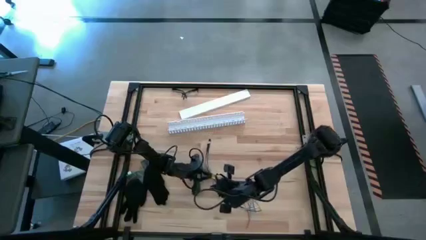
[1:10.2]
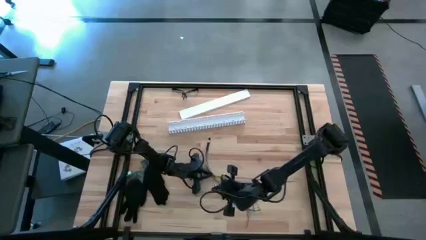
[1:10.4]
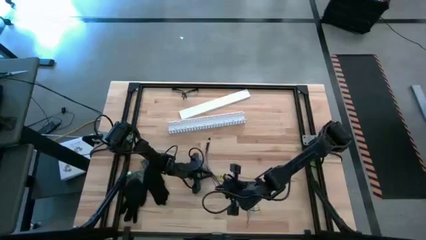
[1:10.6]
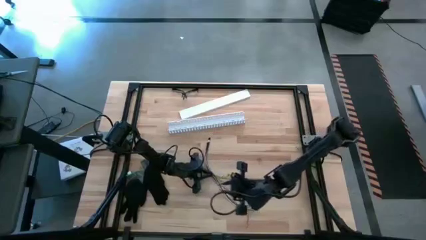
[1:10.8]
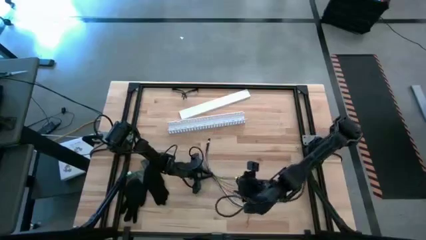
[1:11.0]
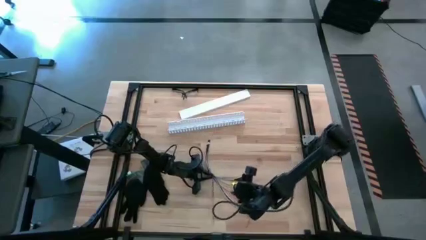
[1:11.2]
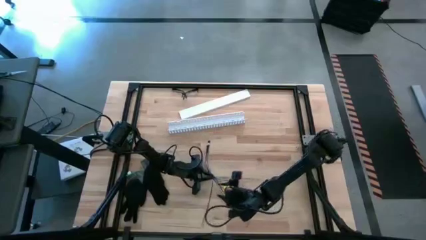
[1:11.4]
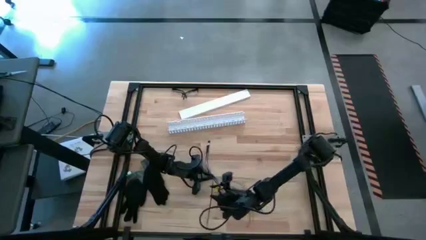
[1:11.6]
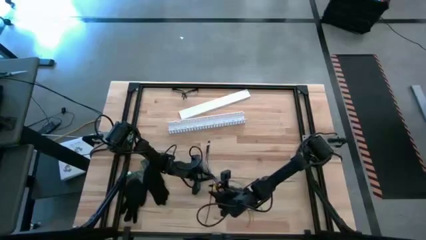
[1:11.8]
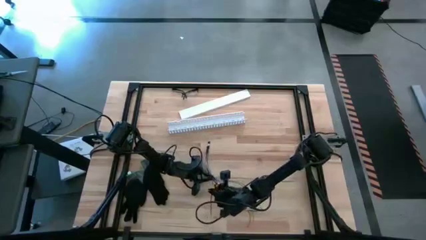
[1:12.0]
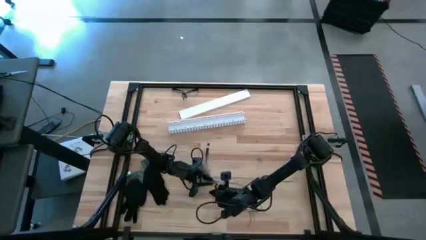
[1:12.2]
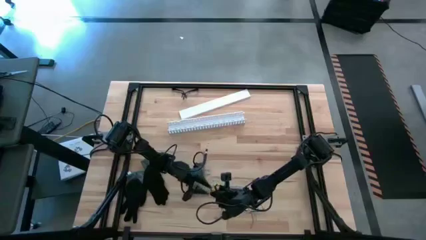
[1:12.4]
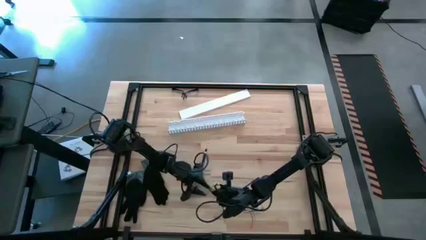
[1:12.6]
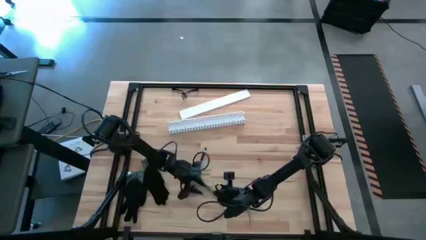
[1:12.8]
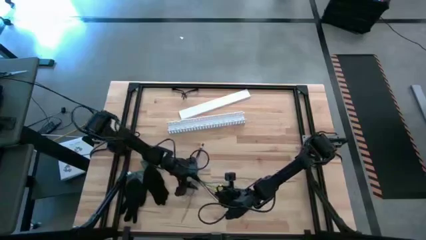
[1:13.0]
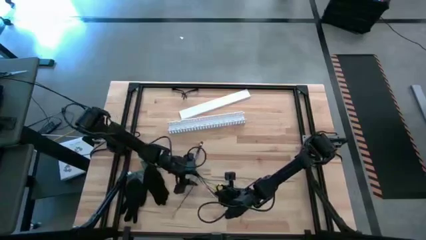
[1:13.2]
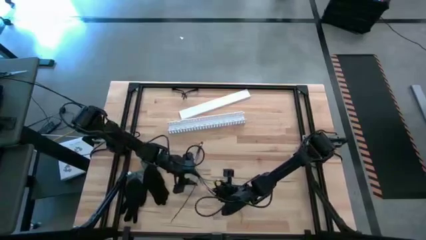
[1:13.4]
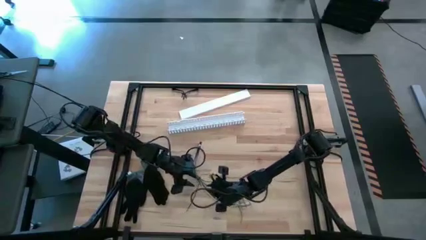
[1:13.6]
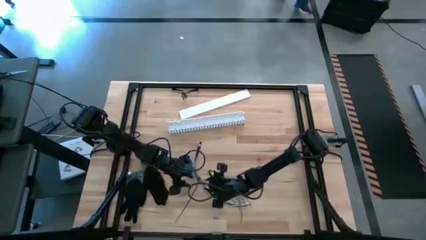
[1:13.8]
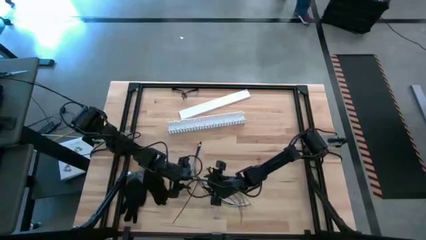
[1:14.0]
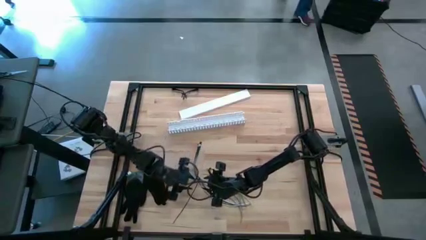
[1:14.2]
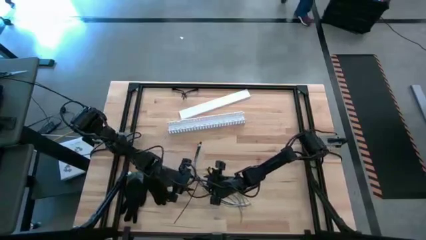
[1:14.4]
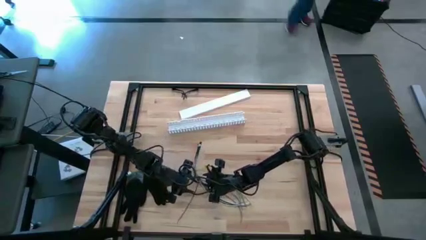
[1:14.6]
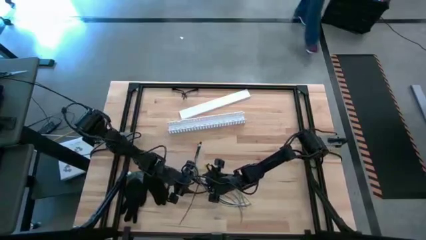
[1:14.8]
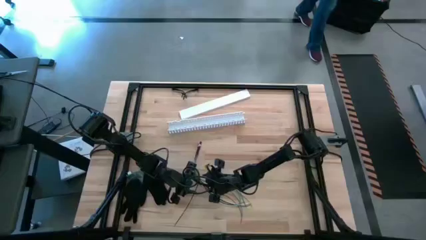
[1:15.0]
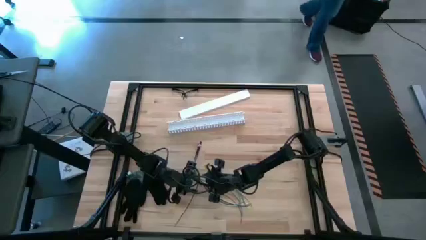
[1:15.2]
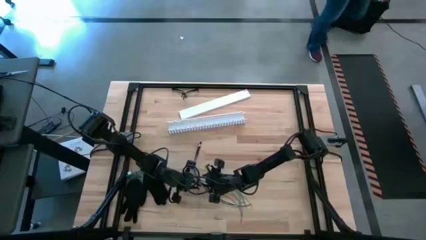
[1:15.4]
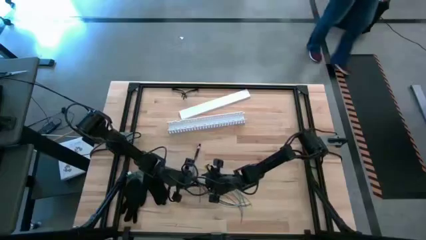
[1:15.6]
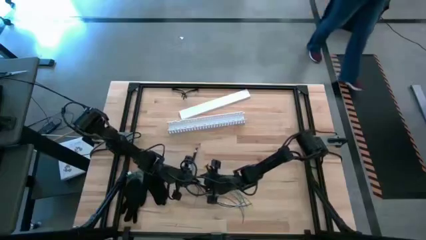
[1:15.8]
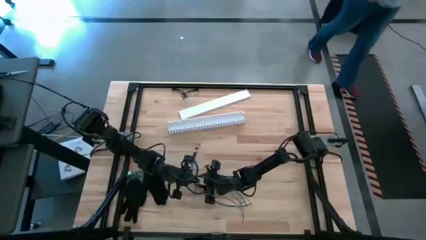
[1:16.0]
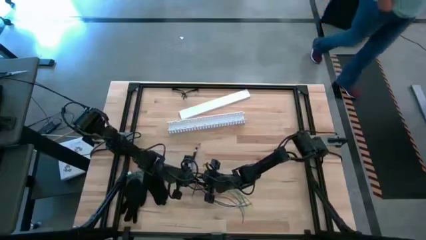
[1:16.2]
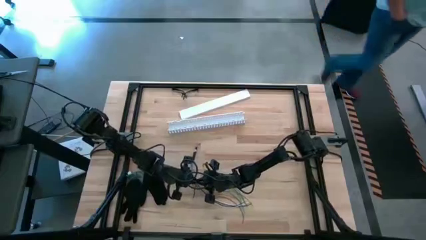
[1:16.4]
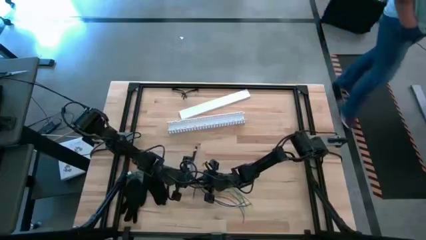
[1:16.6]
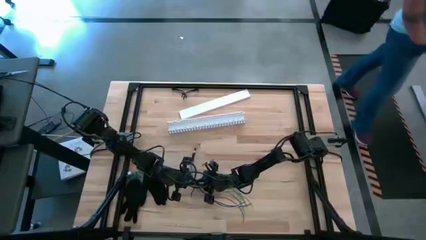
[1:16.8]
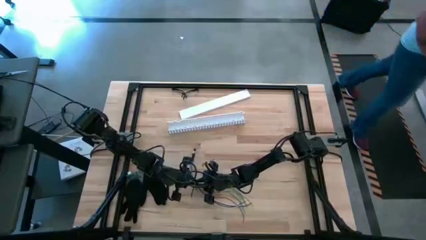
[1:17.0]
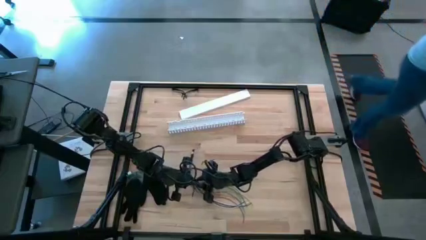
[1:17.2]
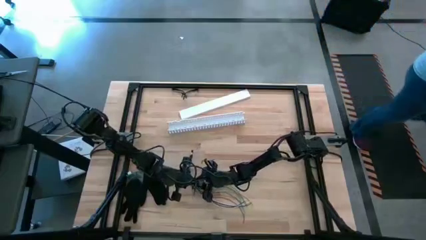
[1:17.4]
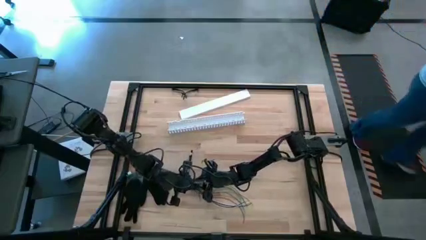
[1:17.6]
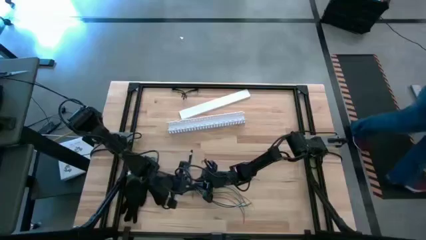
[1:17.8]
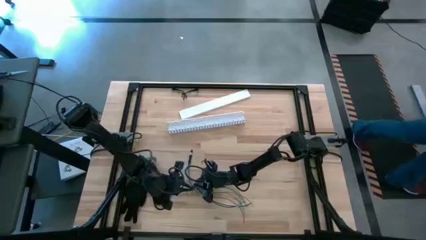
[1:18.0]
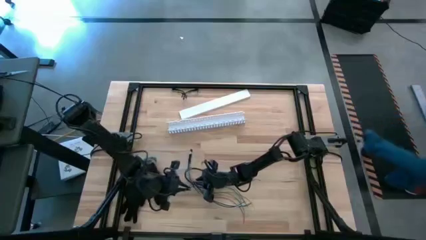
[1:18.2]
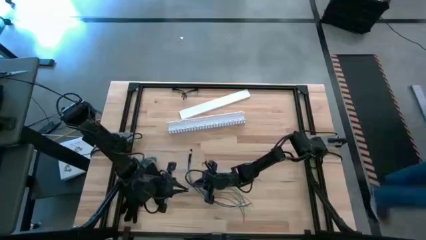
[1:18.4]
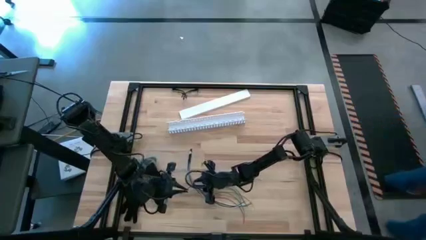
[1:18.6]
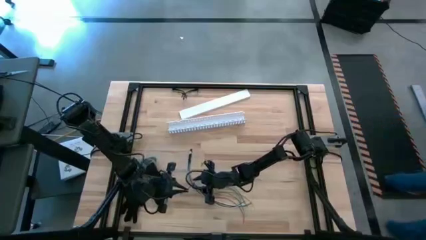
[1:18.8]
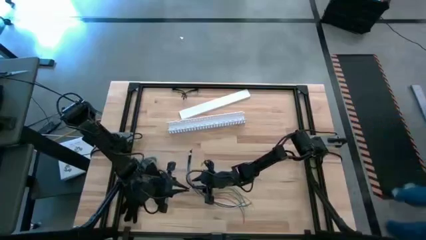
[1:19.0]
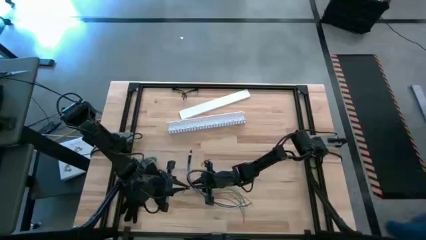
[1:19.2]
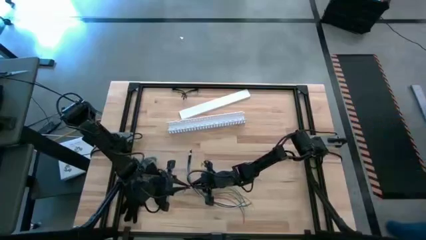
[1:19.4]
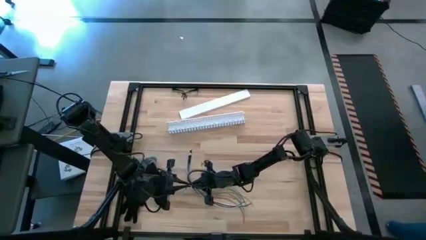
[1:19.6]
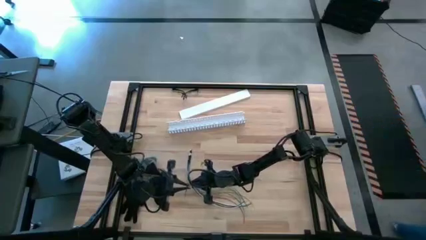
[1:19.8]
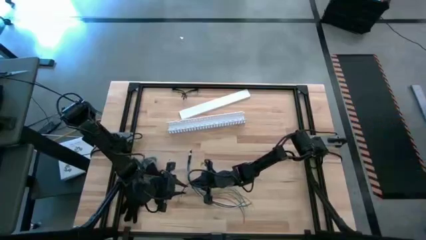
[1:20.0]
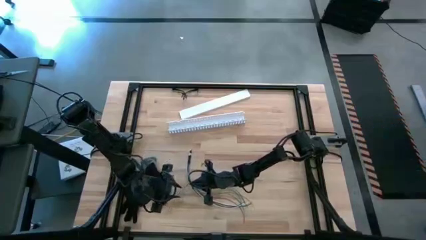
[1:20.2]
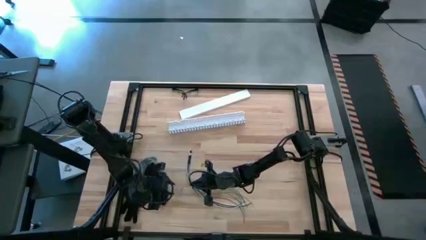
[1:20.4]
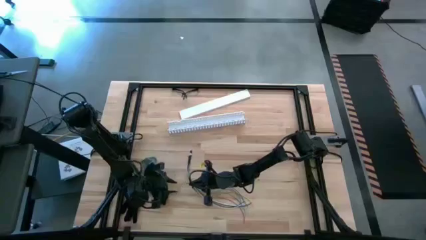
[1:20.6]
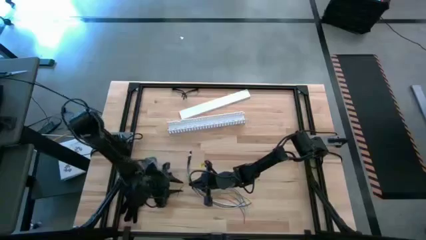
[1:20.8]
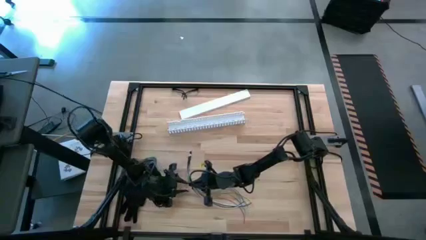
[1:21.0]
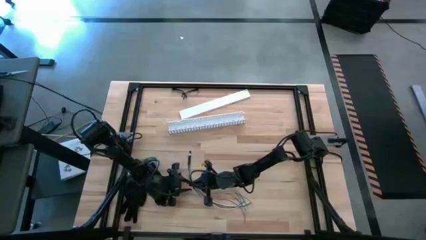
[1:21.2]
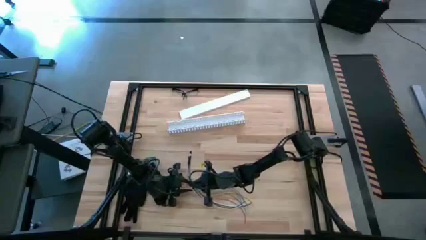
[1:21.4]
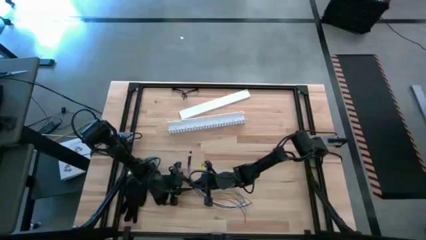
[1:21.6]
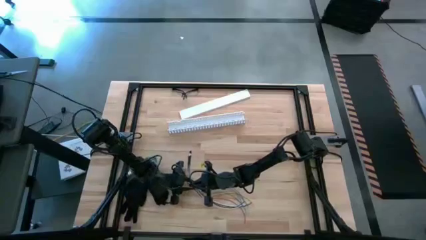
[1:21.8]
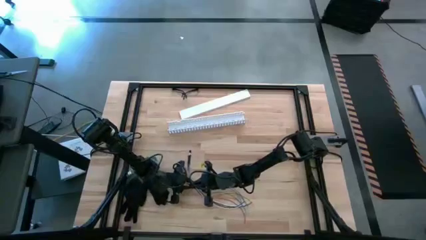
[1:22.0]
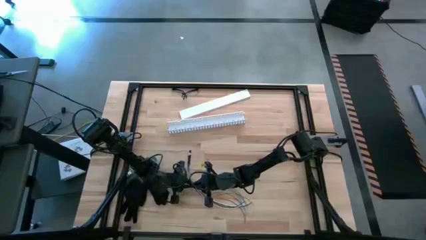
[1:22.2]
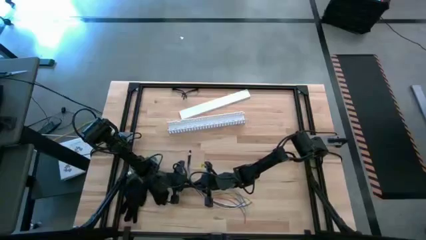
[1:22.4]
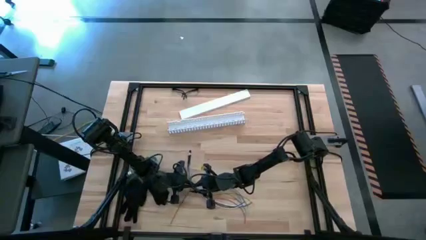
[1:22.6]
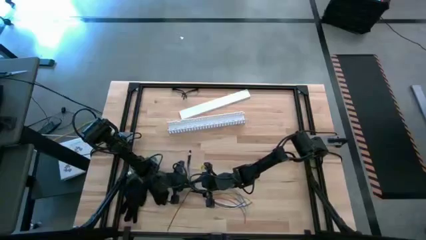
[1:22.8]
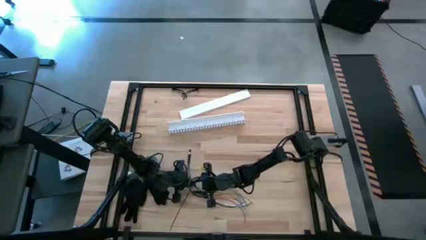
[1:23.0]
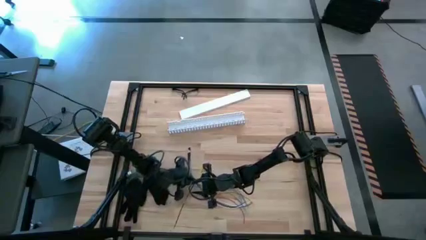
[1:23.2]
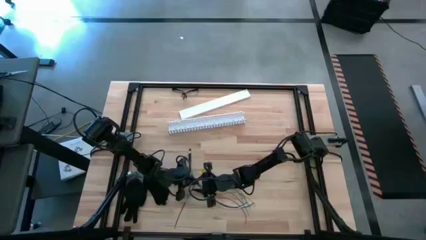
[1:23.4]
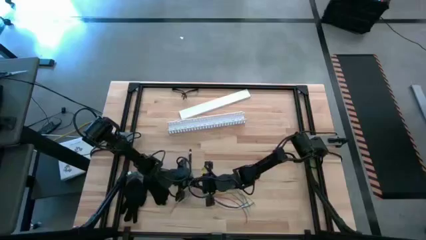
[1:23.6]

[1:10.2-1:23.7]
Task: Ziptie cables
Wrap the black zip tie on the cable

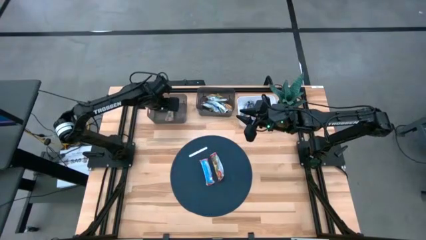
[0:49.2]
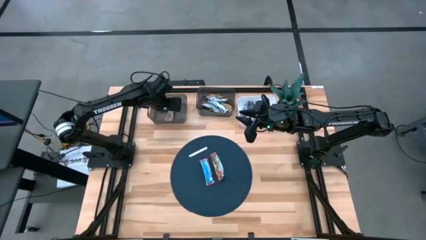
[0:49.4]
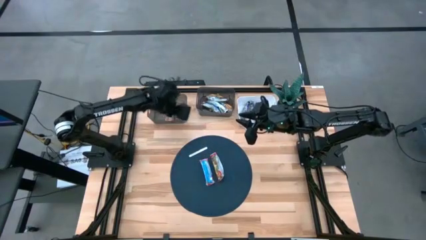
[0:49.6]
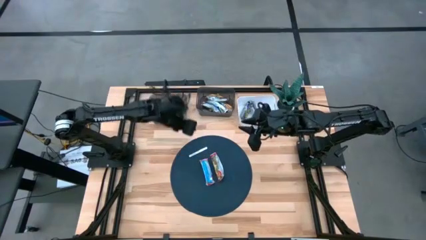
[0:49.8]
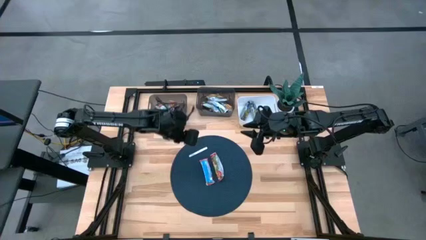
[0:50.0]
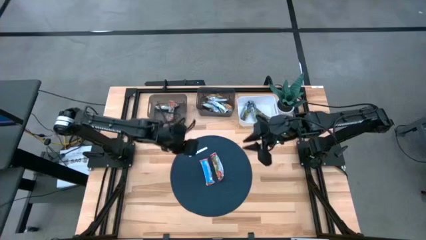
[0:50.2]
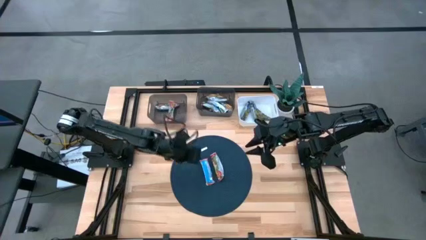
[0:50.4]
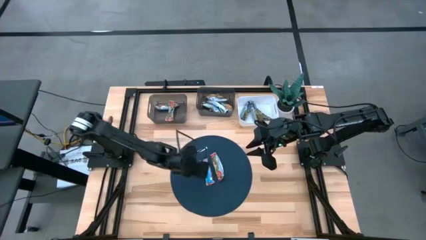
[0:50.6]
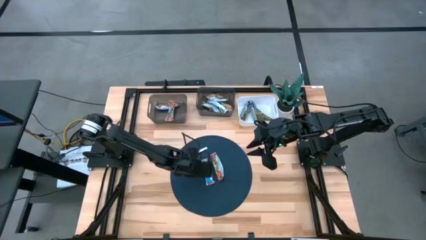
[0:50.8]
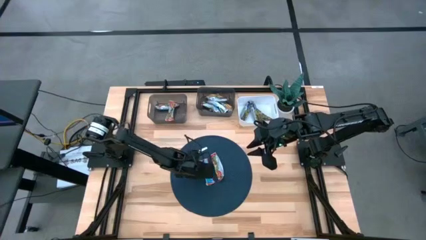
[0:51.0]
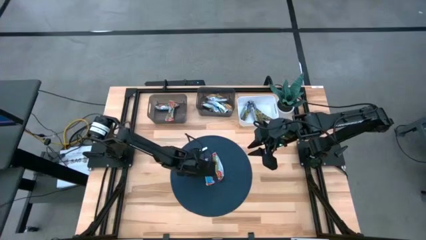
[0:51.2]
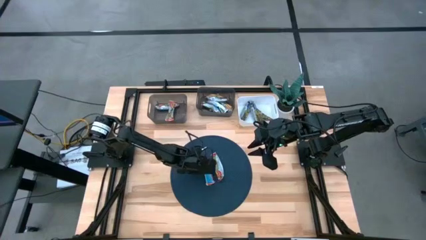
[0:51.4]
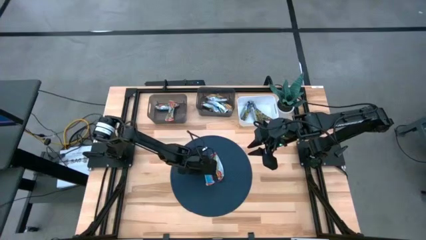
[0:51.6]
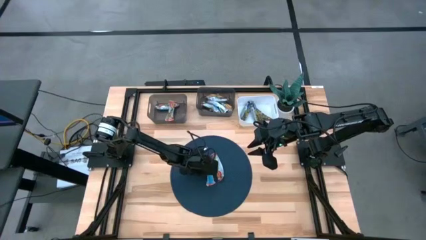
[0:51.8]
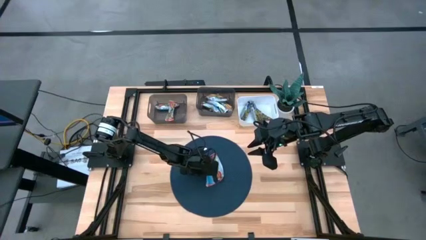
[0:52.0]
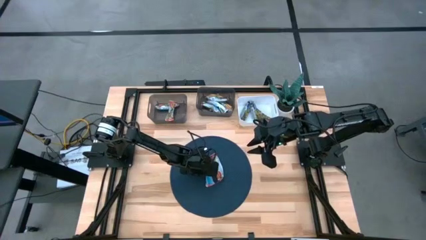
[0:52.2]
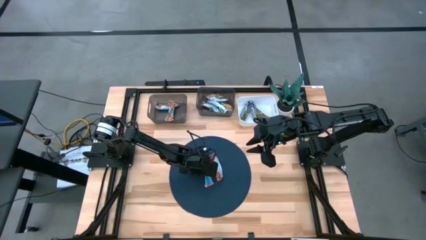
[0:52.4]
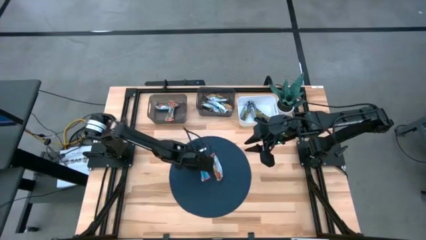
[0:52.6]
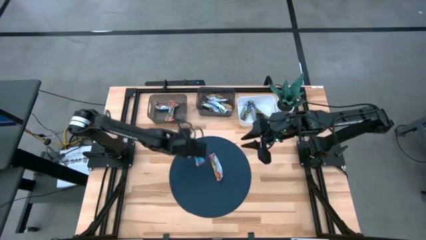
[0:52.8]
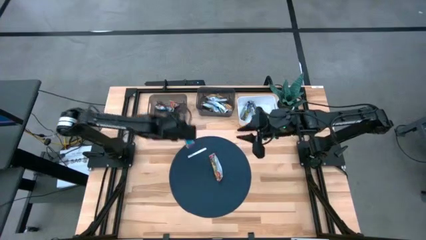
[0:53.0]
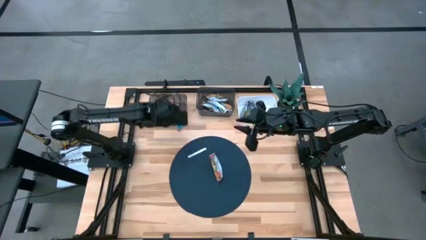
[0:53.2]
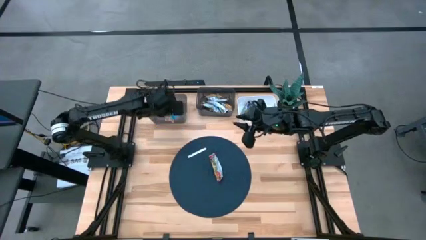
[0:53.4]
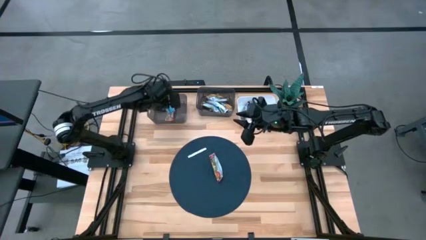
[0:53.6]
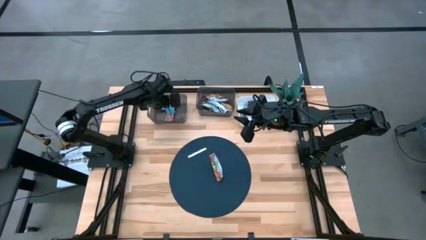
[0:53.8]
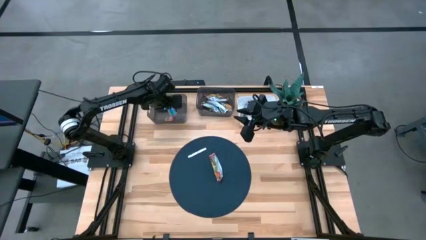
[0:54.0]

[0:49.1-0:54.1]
Task: Pick and place Granola Bars by type
Put the red granola bar into the left black bin
